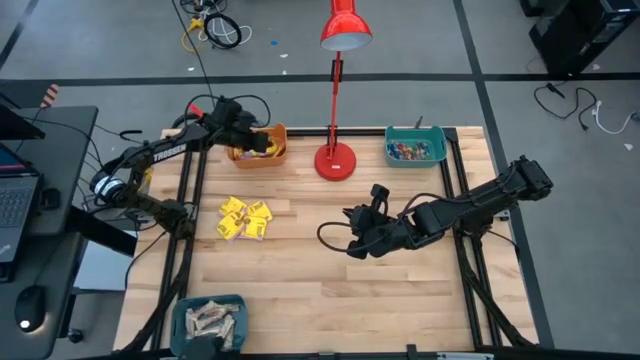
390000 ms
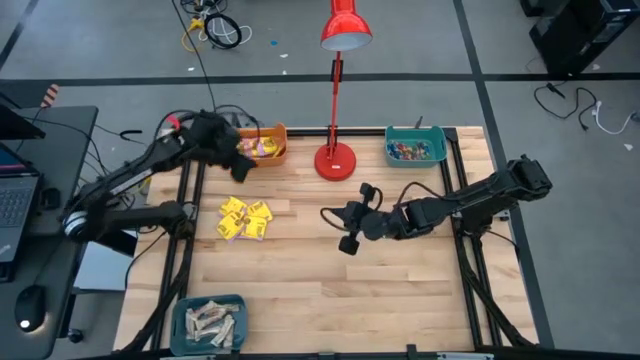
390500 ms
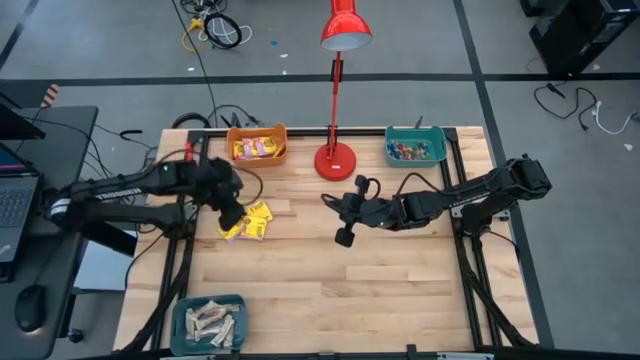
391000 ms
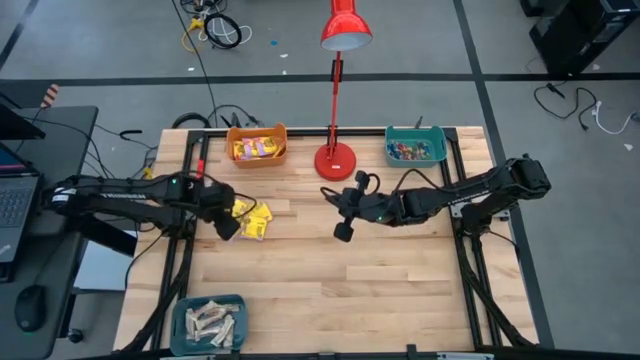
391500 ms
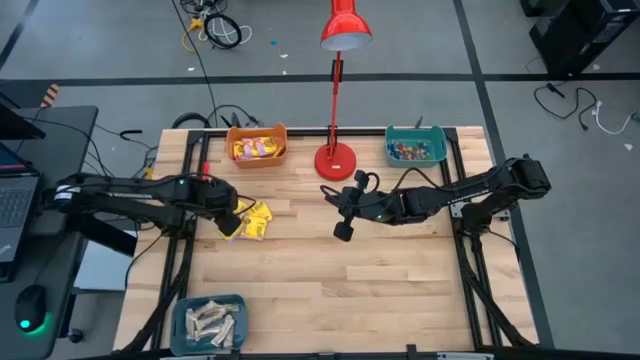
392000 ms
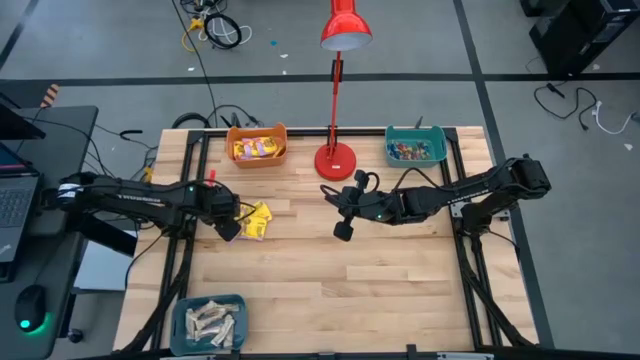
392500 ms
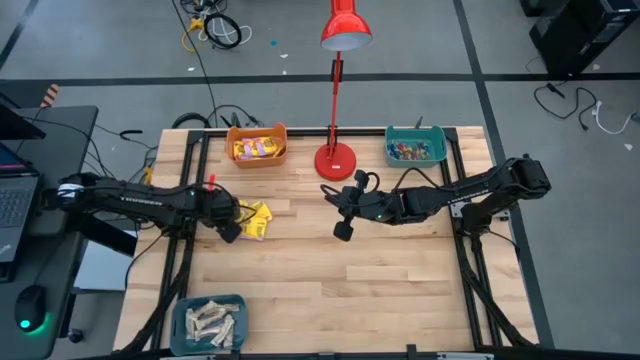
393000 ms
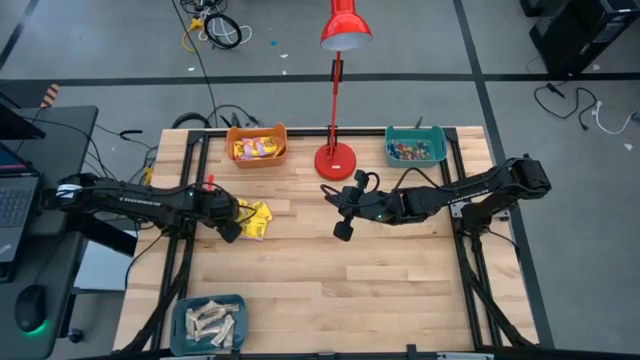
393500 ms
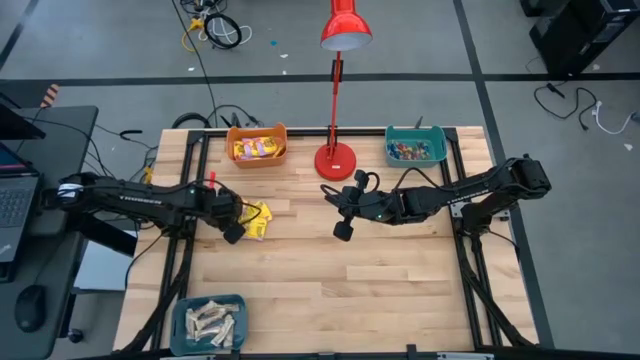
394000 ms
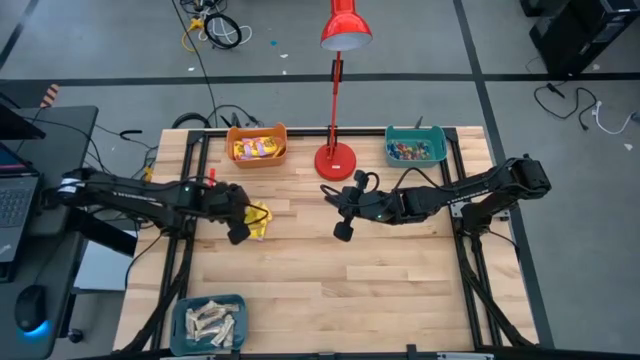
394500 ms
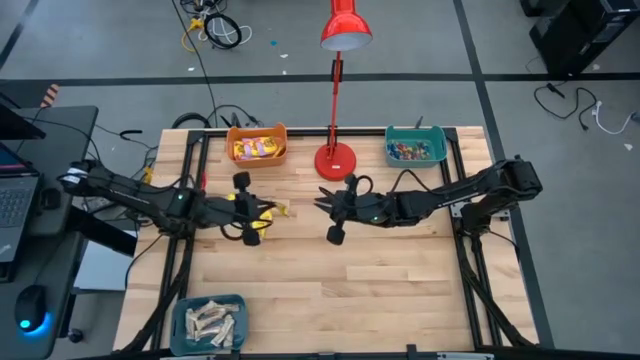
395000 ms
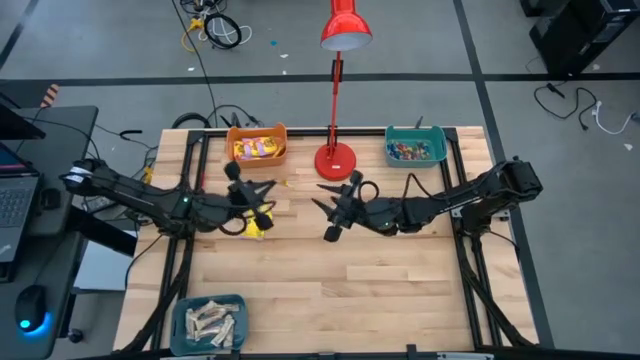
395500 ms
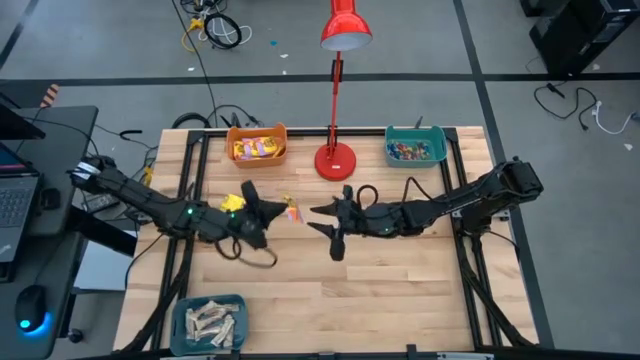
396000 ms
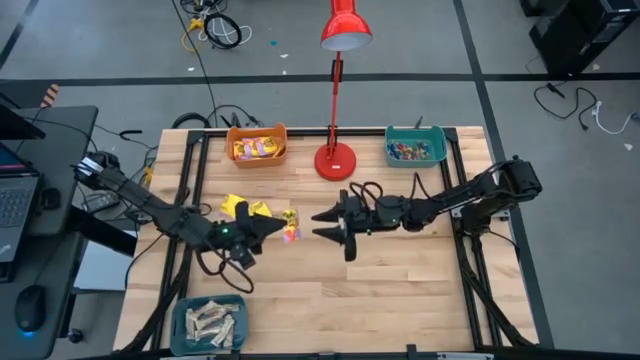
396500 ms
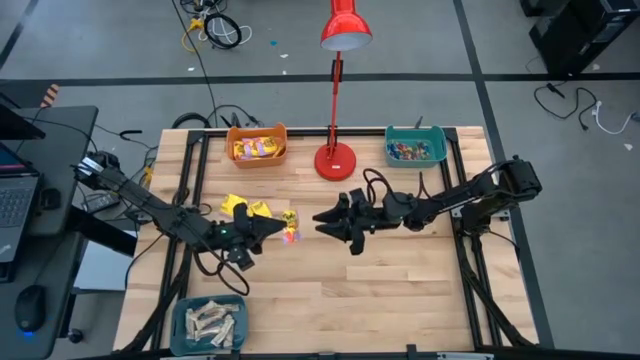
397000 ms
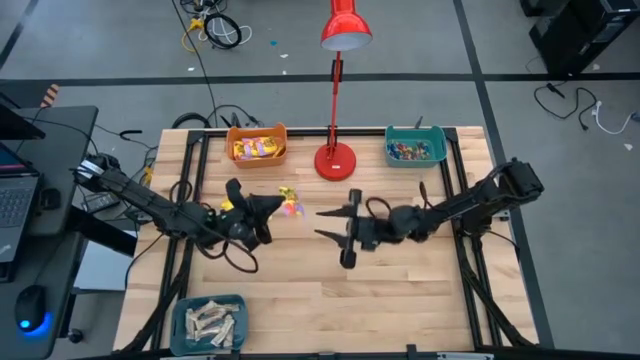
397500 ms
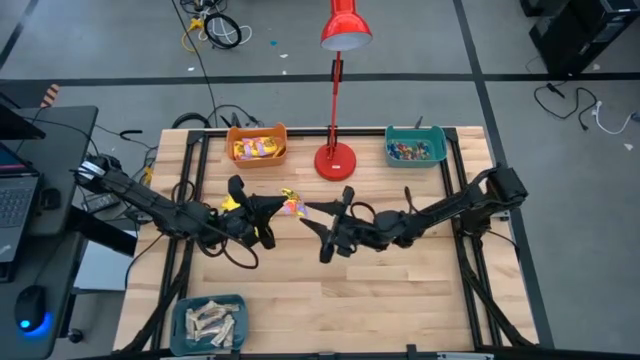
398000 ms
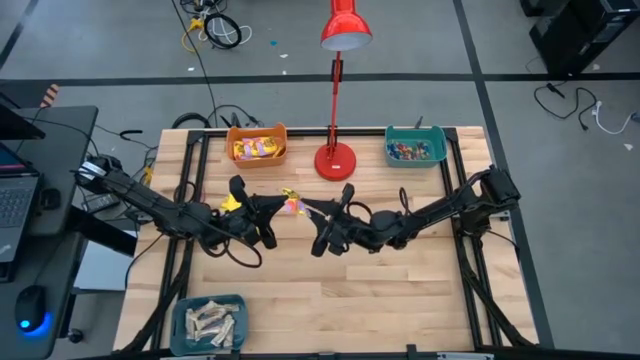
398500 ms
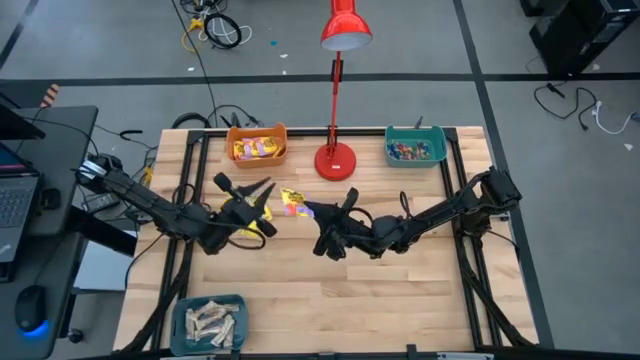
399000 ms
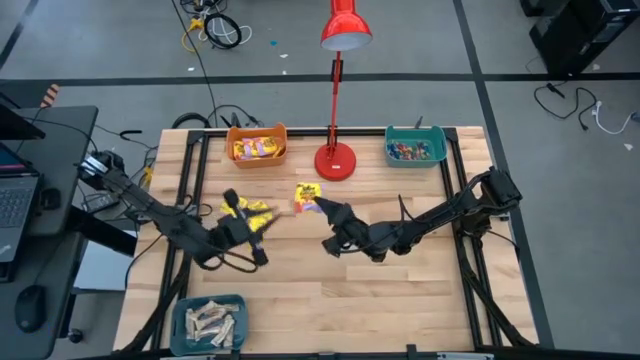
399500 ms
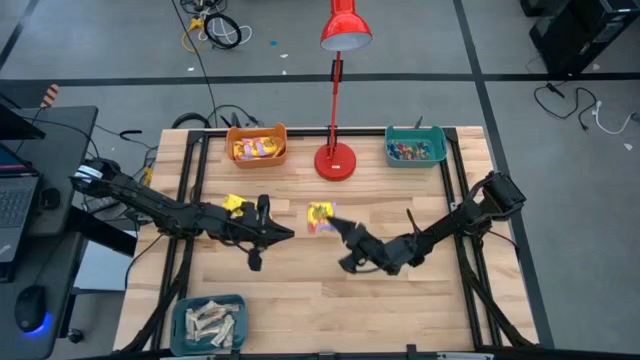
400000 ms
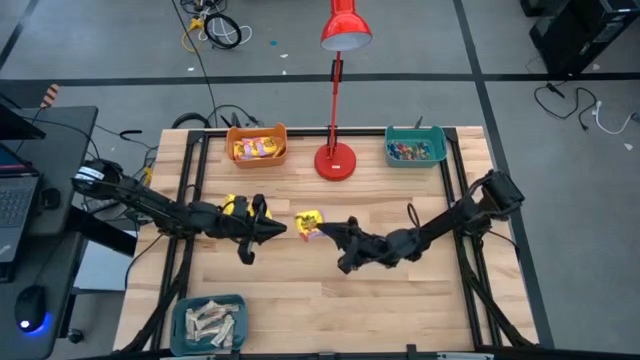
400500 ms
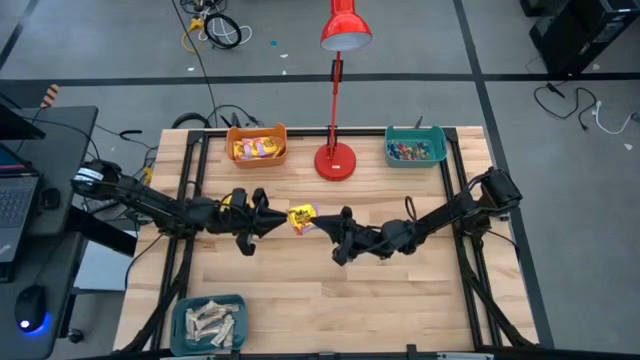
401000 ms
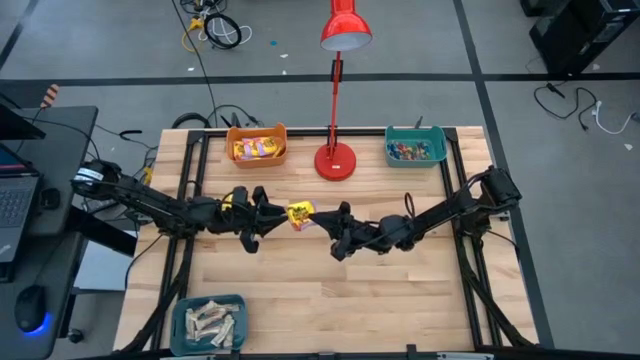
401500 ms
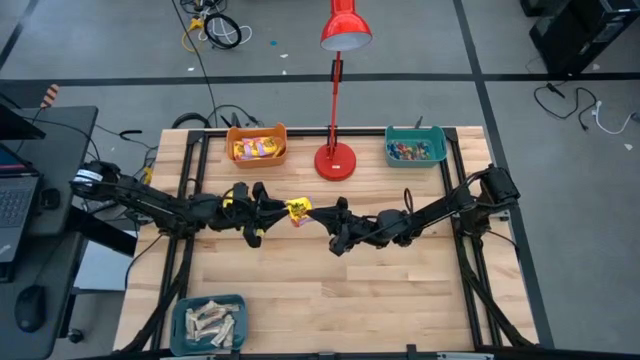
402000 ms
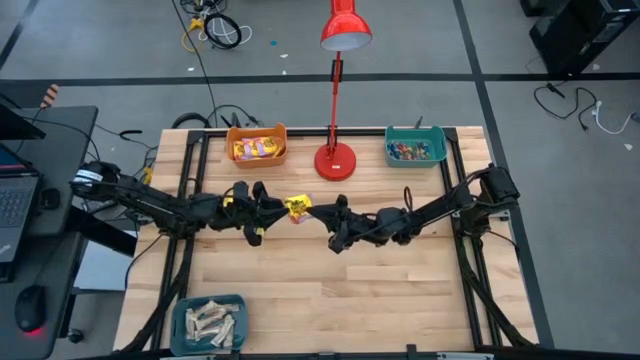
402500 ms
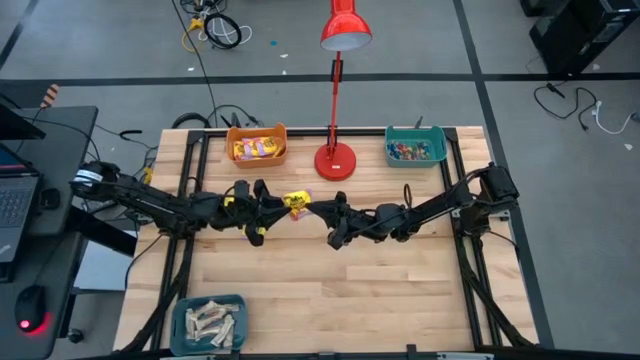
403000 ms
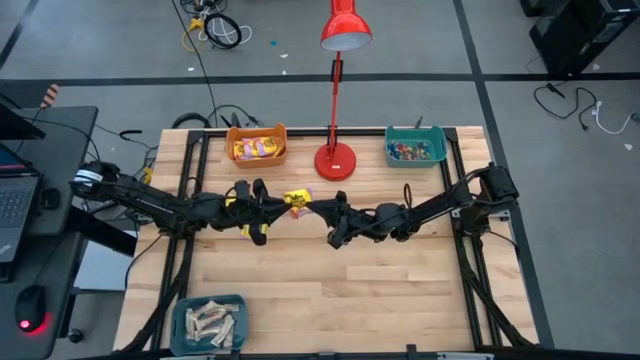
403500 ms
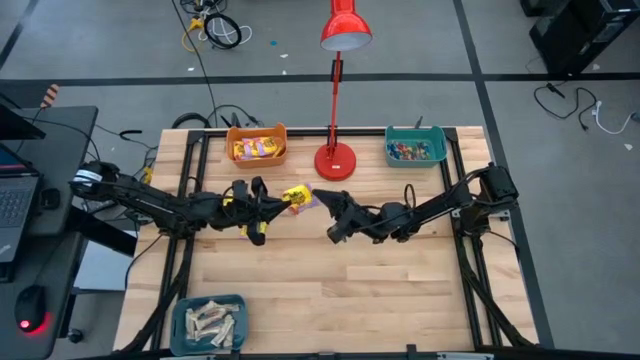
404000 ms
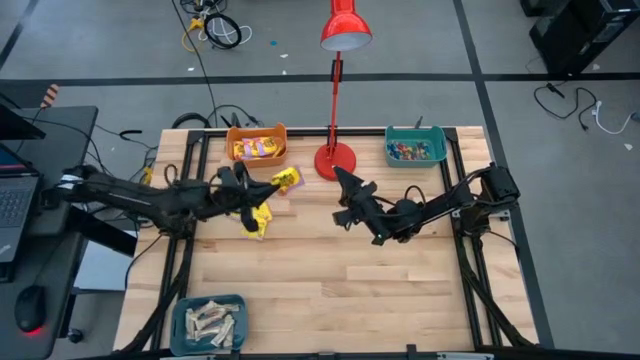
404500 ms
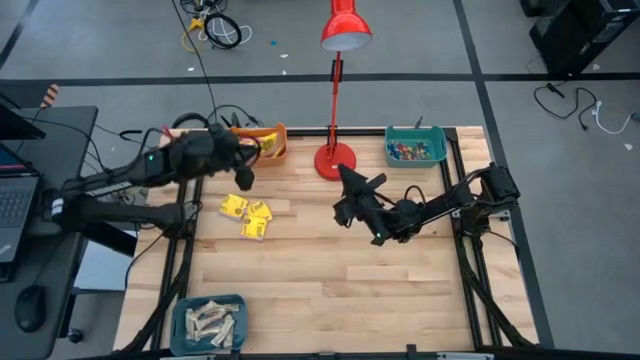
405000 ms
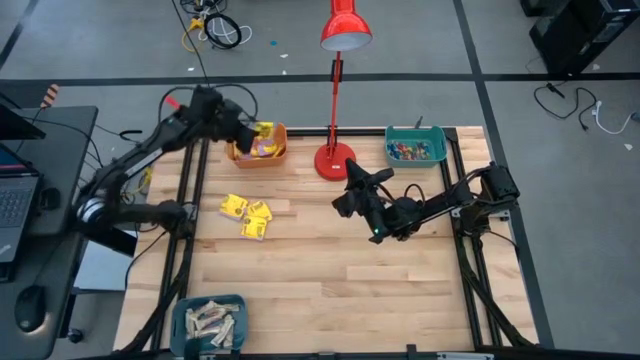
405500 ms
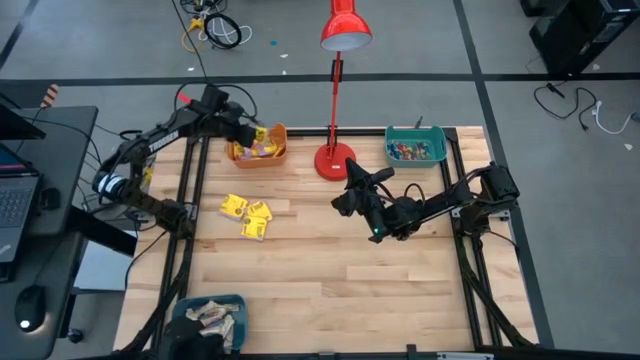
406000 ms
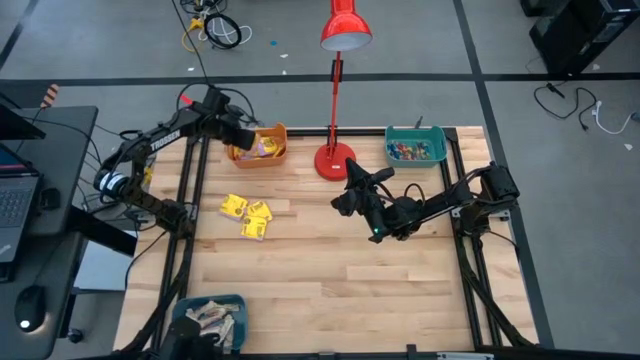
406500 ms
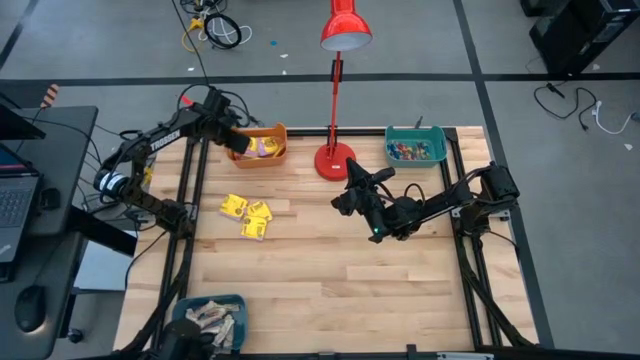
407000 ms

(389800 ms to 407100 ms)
Task: Sort candy
Put the yellow candy into the orange bin

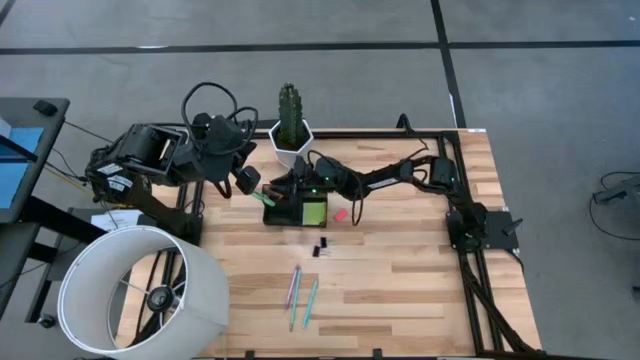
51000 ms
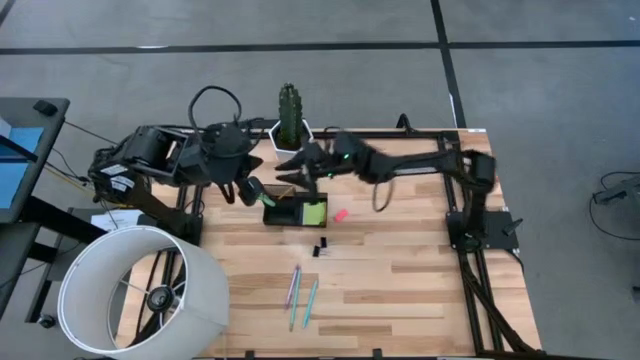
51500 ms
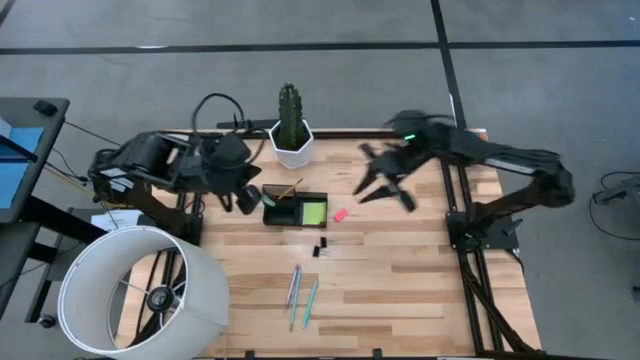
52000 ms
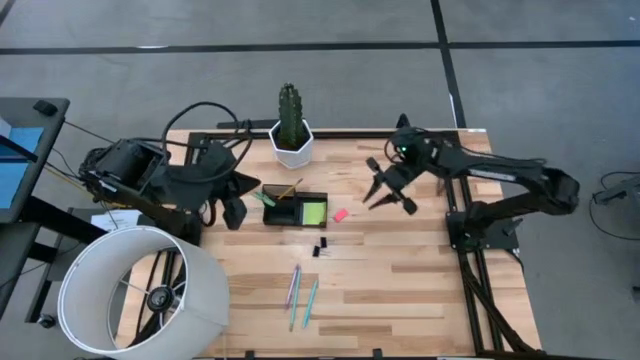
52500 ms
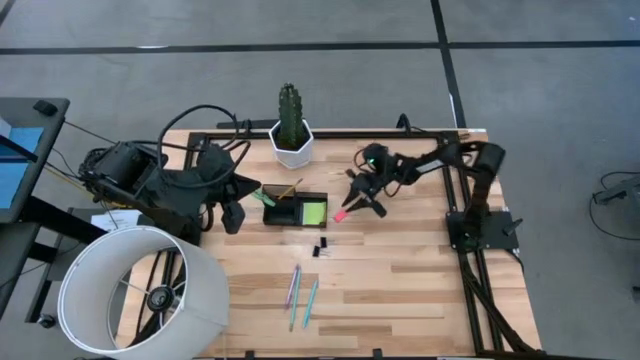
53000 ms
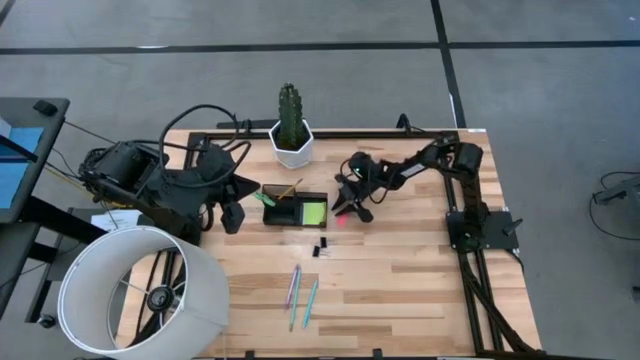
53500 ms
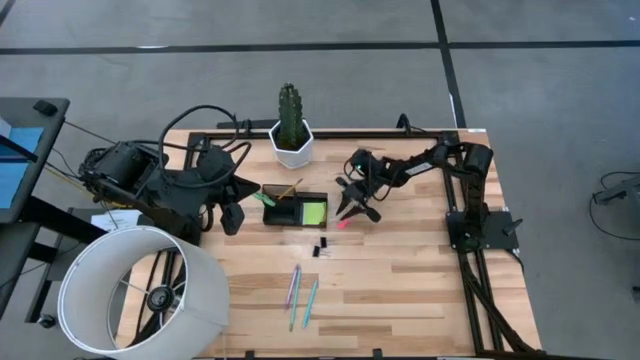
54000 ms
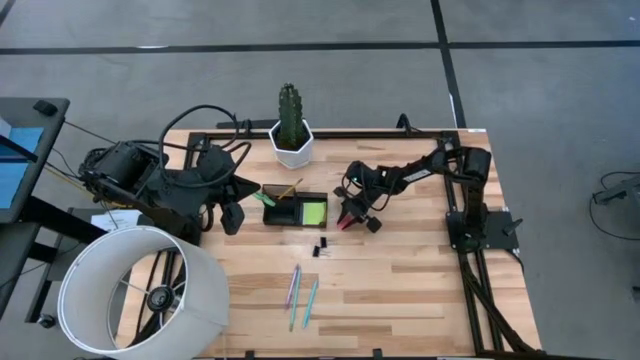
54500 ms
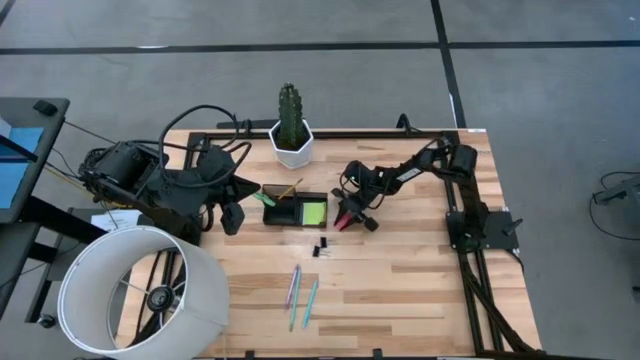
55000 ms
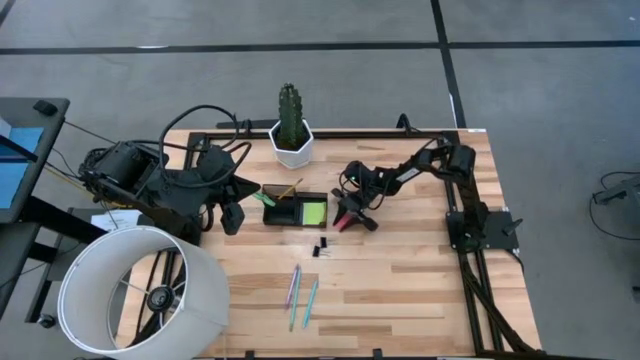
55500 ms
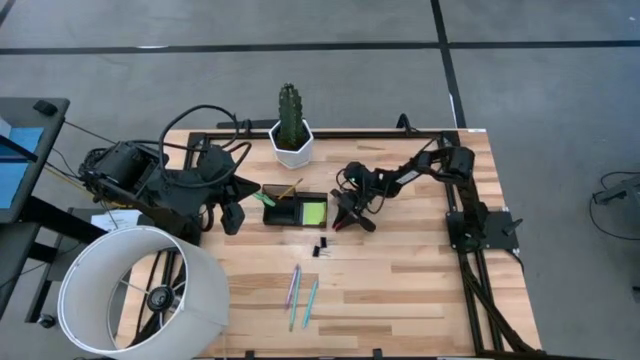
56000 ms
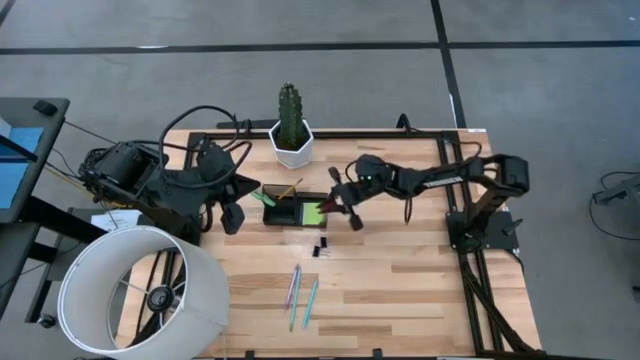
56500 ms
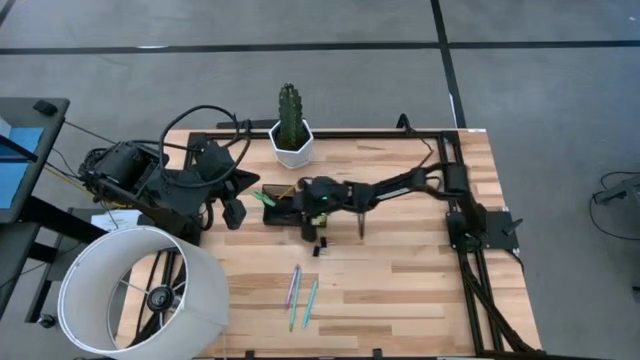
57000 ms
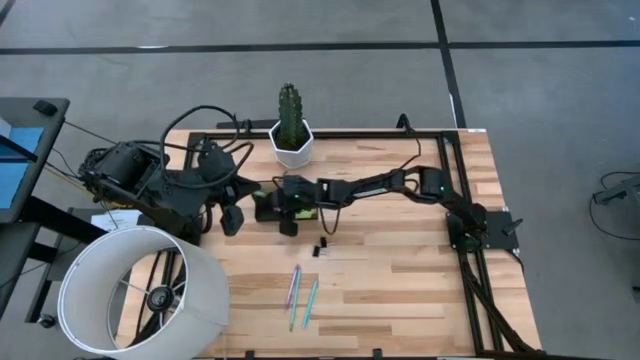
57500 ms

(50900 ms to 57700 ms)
Task: Pick and place office supplies into organizer
Put the pink eraser into the black mesh organizer
